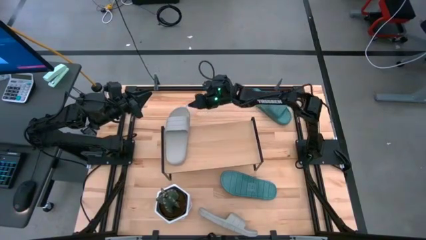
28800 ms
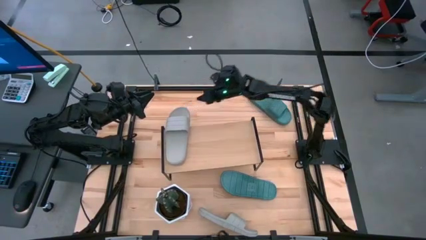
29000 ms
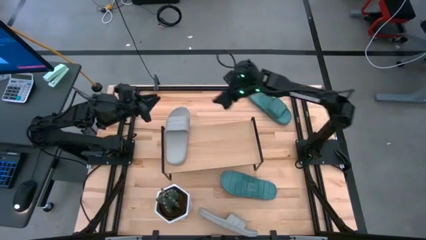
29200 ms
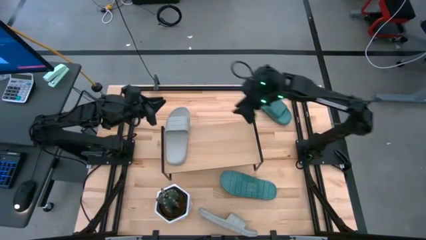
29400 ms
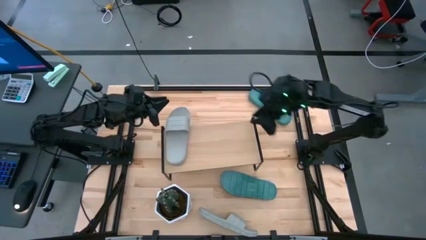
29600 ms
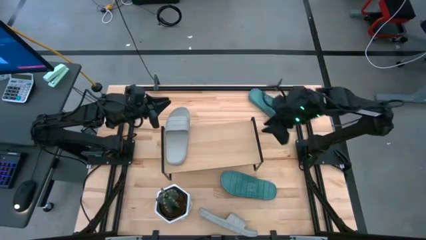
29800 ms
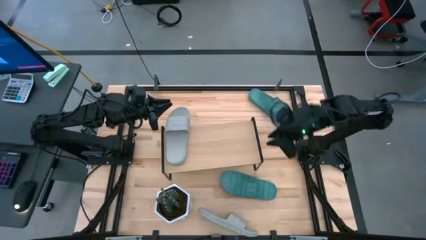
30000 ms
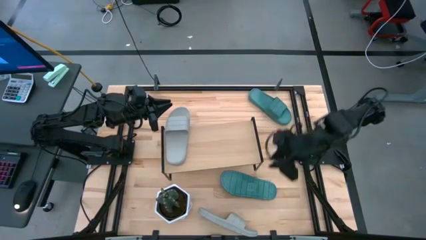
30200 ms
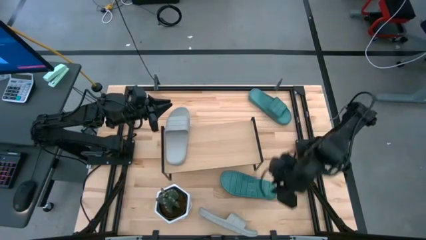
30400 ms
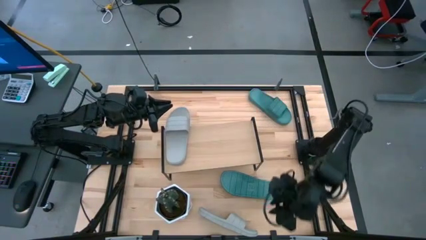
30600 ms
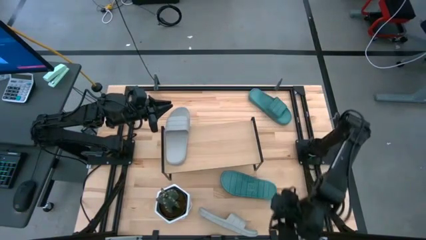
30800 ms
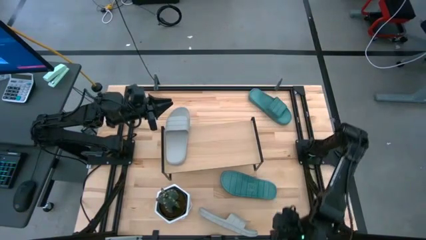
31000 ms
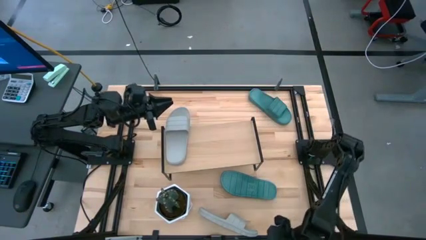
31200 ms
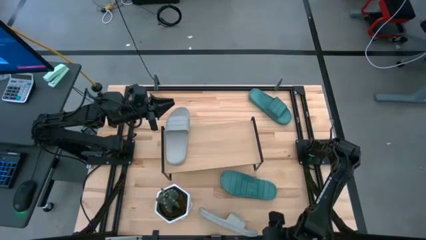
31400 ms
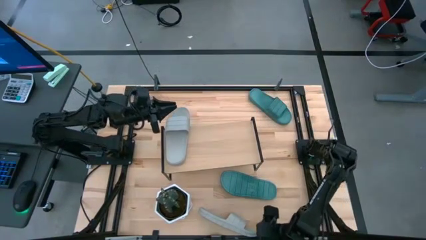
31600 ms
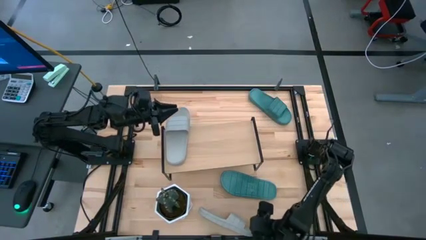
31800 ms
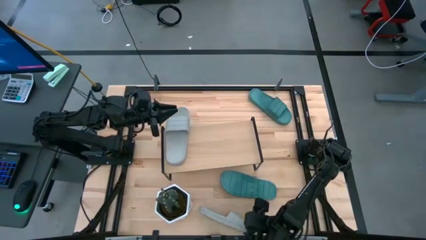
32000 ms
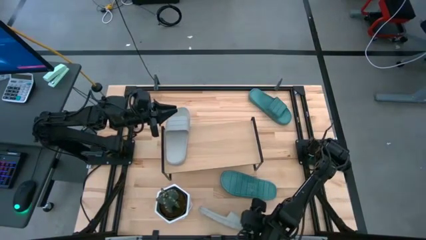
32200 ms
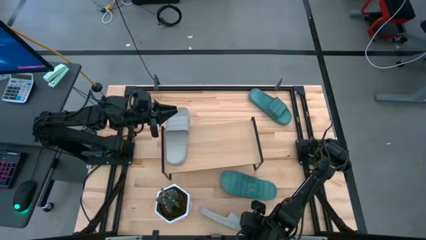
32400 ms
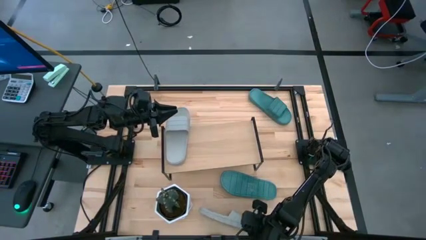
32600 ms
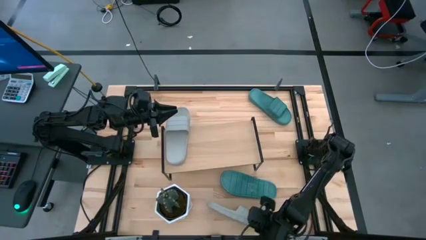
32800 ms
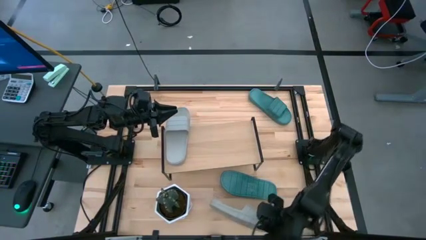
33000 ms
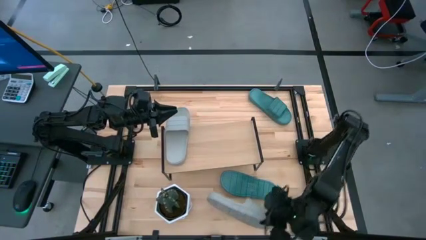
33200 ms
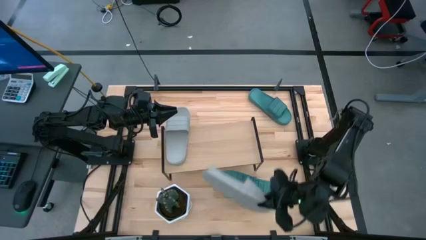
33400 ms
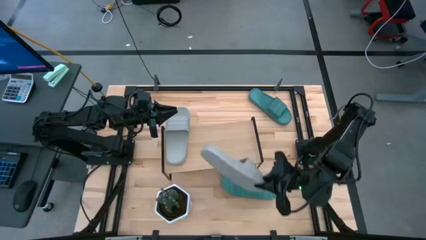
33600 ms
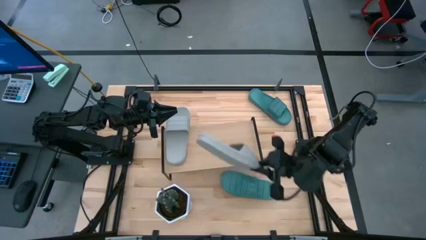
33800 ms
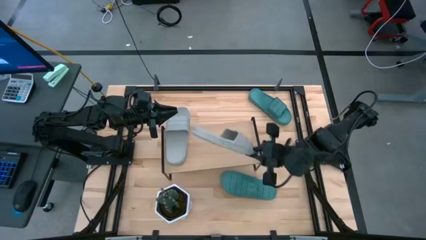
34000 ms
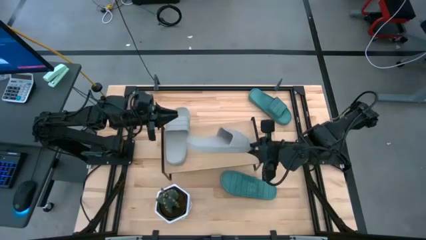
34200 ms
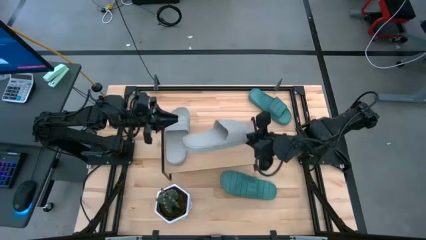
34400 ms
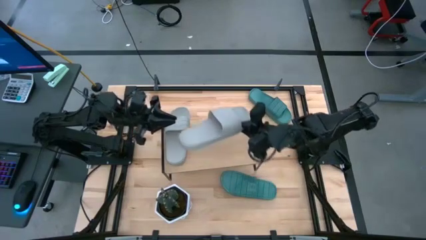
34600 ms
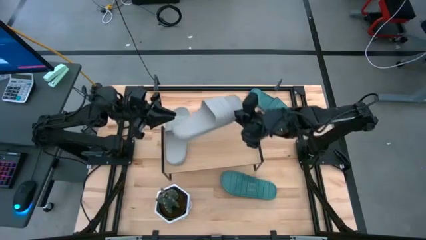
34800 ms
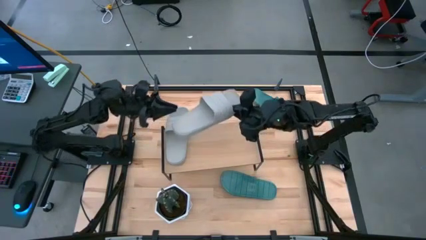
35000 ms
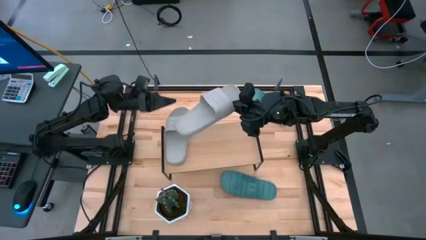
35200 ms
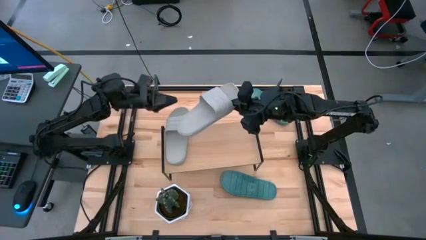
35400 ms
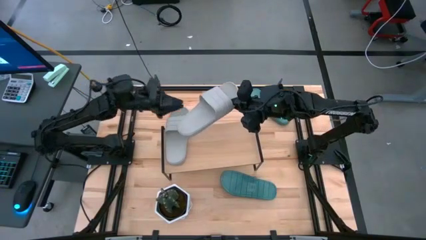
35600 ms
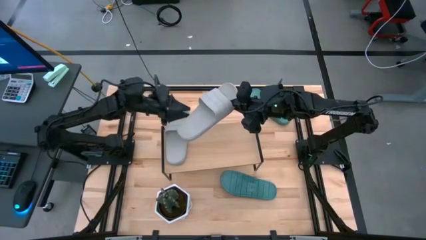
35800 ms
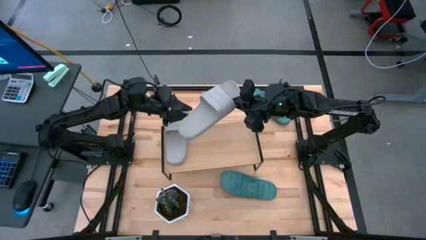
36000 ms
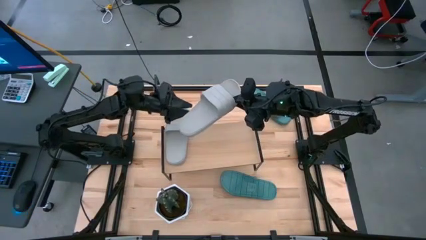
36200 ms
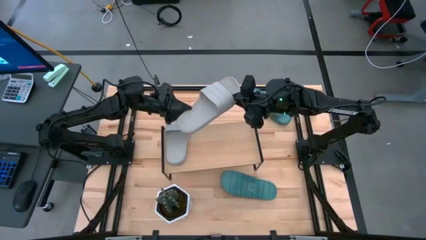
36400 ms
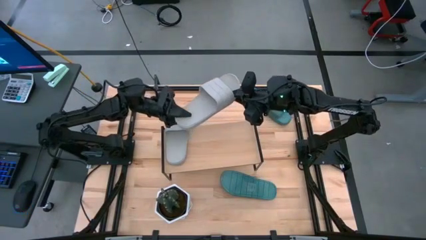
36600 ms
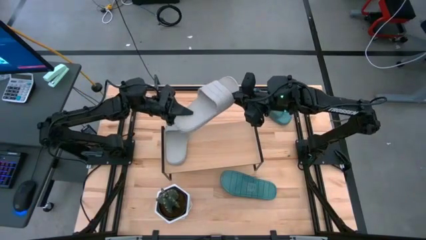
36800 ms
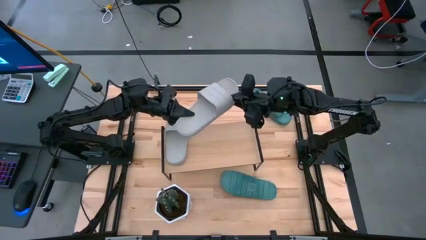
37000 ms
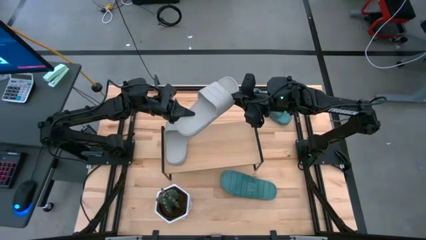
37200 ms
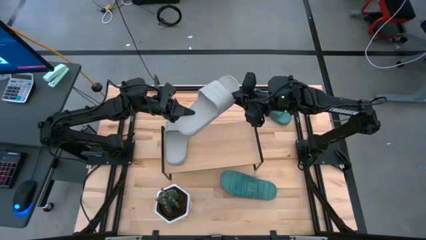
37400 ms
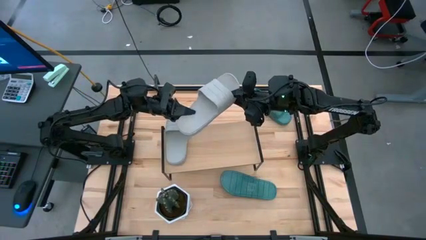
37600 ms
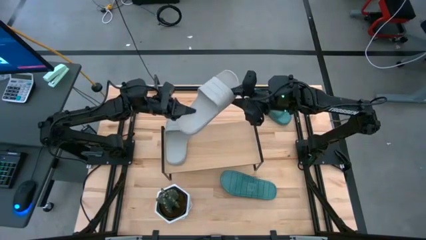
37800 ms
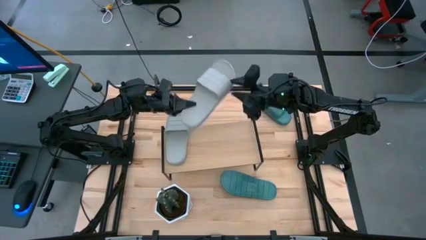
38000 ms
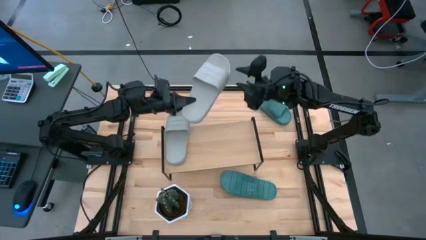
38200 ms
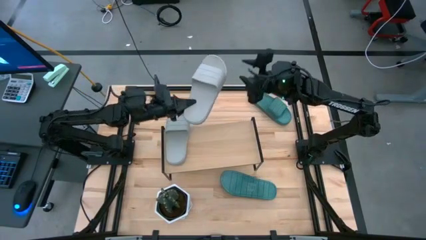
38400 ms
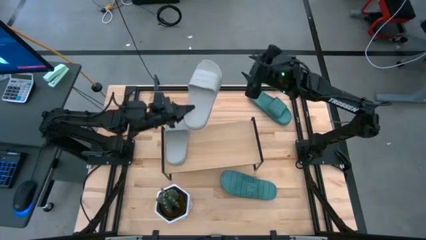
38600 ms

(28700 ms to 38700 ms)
Task: Pick and place slides into the shelf
Put the gray slide on the shelf
